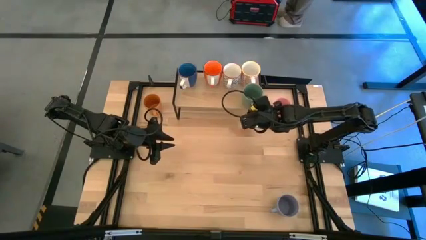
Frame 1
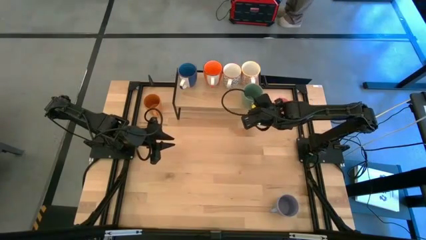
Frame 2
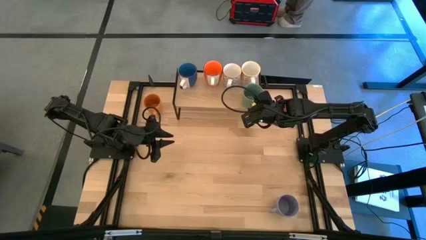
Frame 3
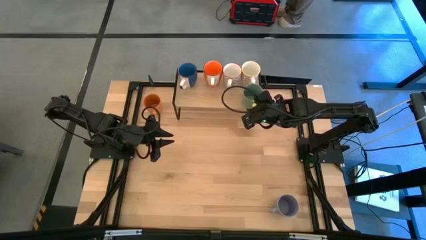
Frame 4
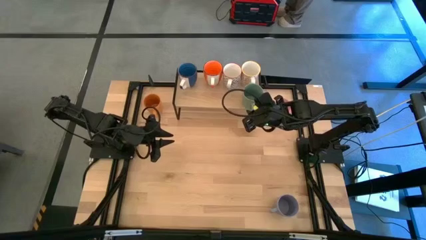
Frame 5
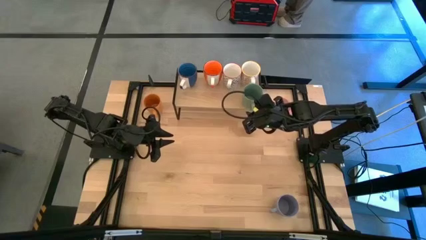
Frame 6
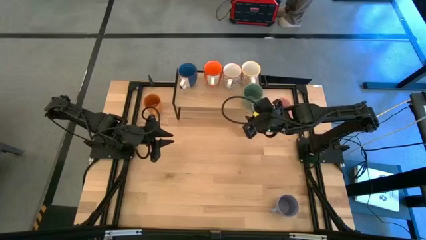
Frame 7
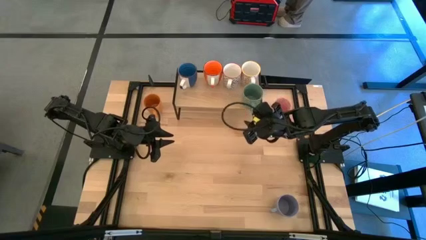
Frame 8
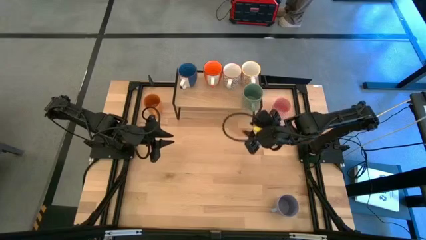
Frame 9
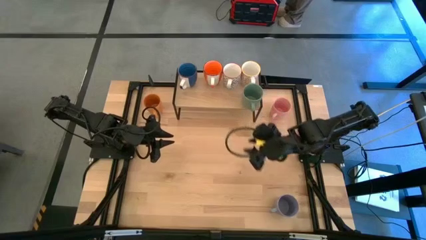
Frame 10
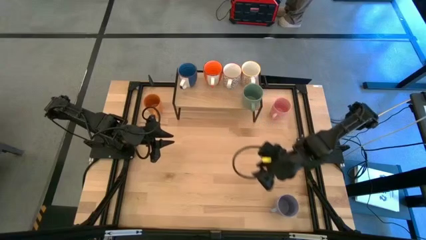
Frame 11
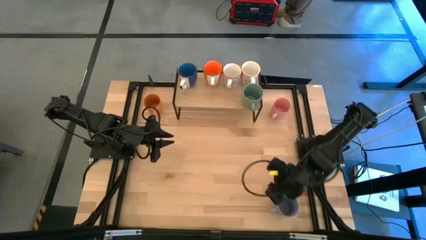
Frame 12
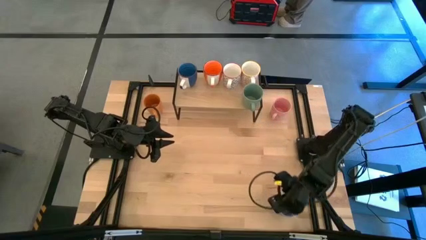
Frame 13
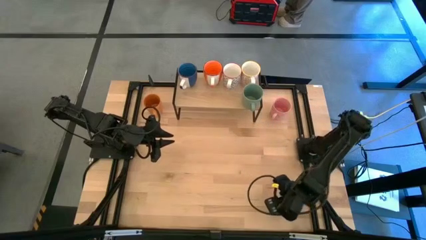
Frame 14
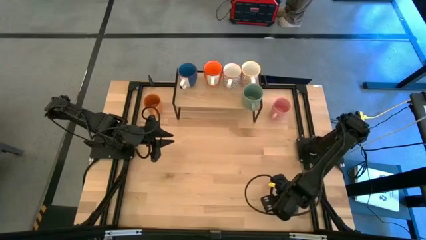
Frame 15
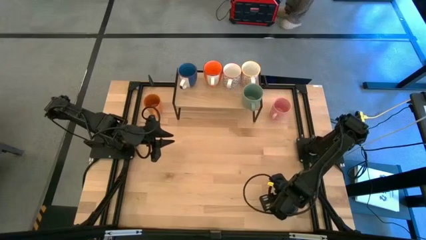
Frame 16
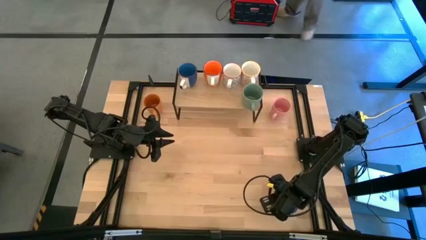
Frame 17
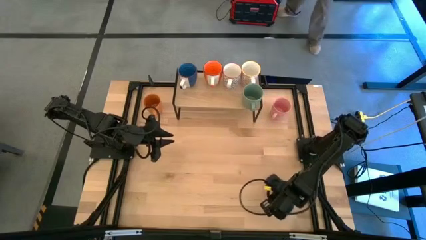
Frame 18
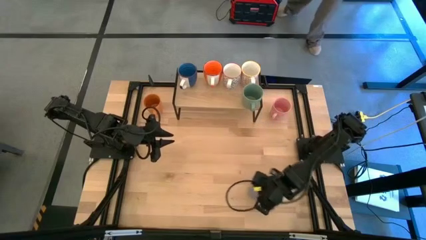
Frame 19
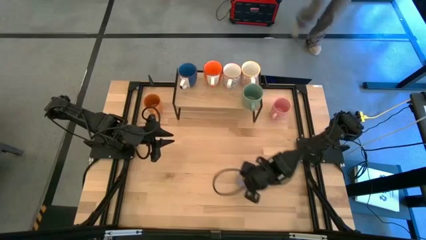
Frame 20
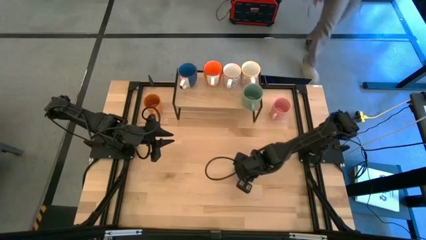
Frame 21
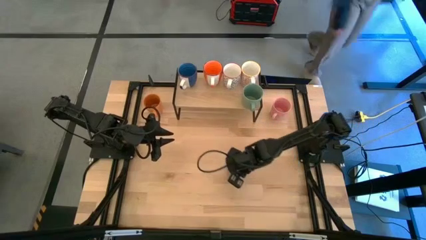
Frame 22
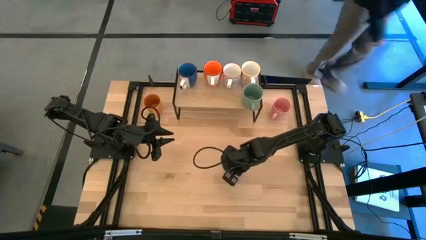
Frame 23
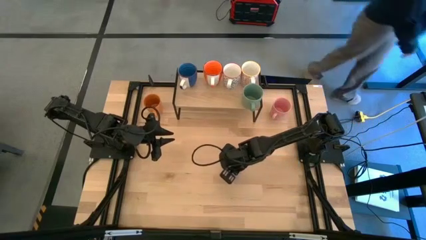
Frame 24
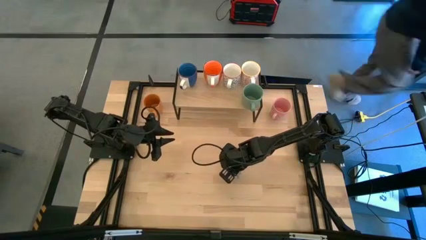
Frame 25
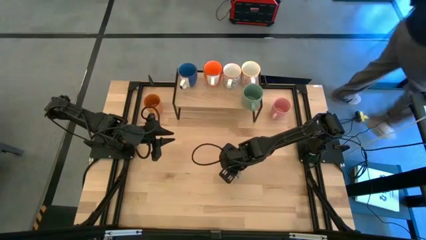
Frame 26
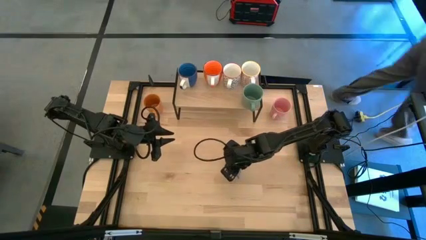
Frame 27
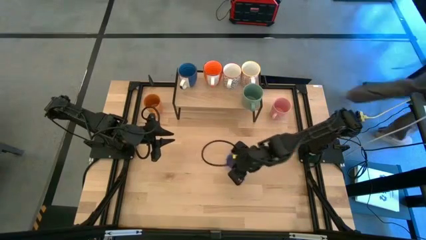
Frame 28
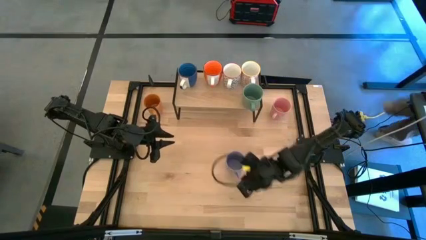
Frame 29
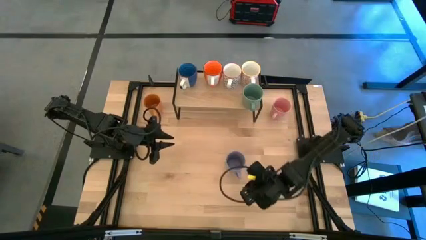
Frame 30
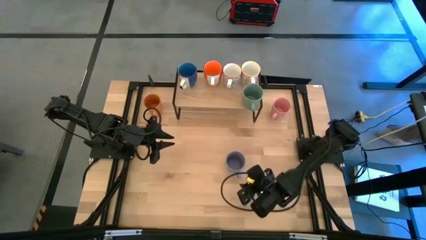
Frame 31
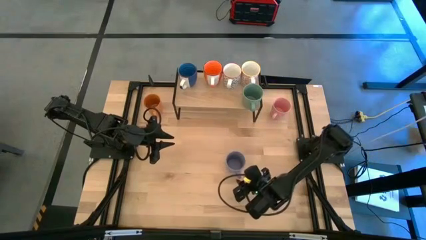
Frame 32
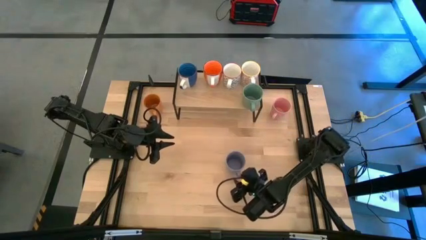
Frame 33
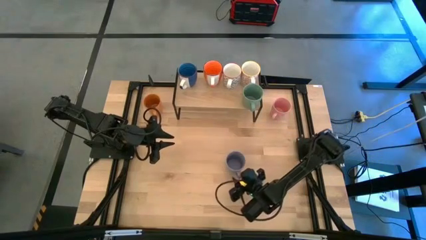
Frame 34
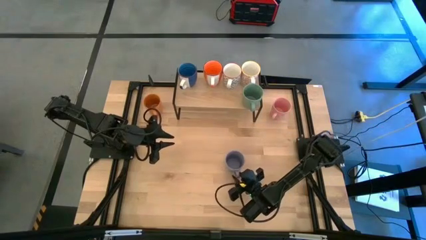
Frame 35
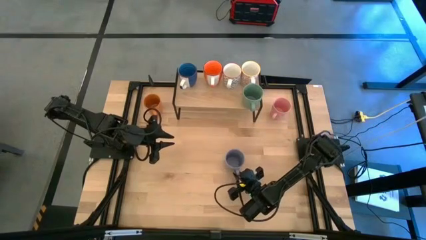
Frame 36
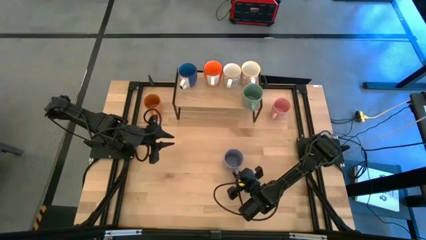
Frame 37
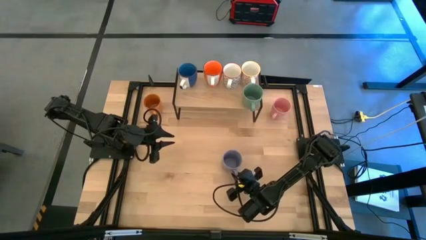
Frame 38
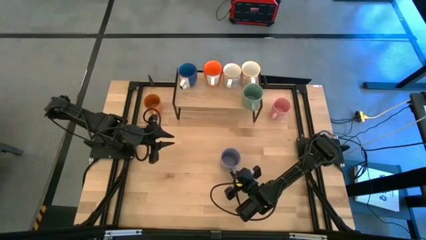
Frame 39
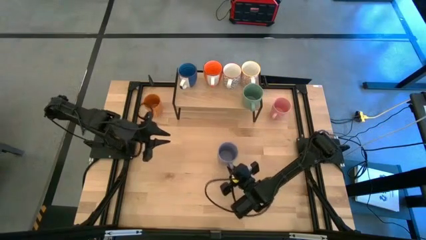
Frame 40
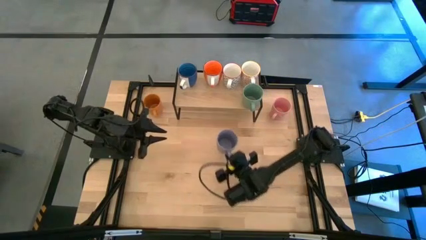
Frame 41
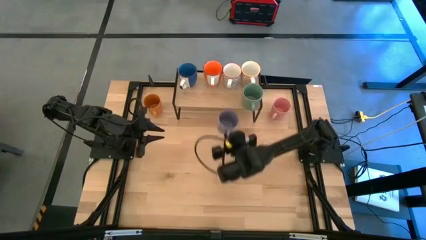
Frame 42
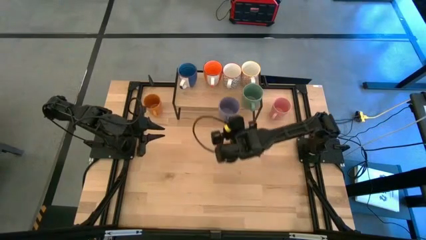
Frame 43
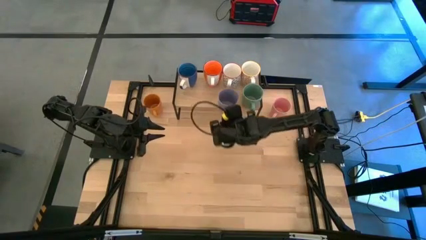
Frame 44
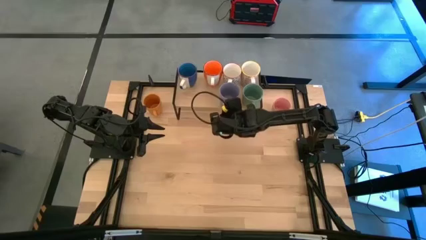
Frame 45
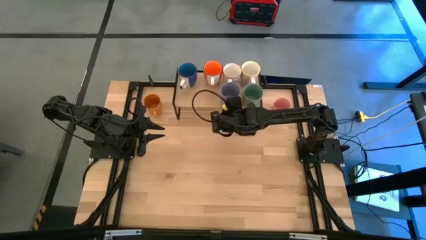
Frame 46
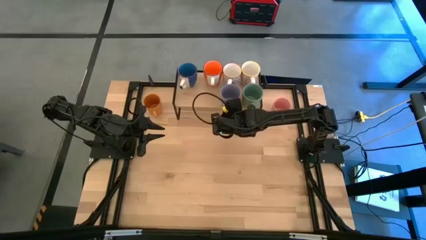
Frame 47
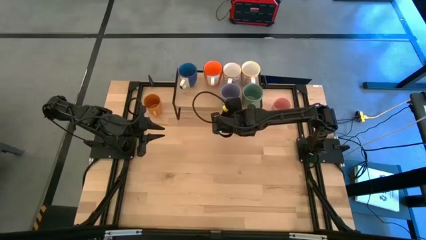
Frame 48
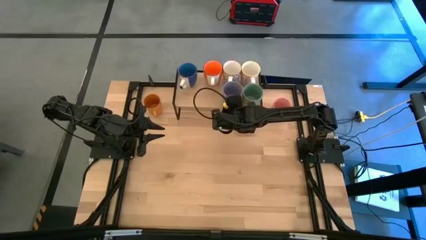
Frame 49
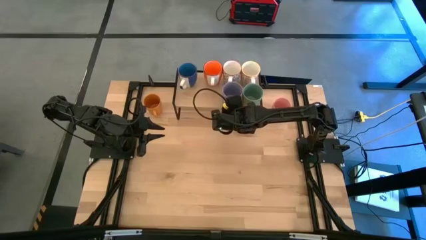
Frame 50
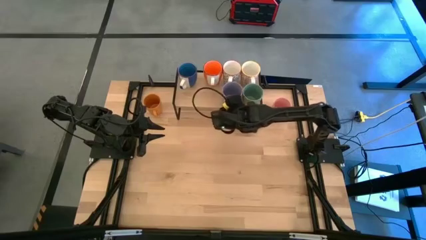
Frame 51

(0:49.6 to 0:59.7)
Task: Place coffee mugs
Put the purple mug on the shelf

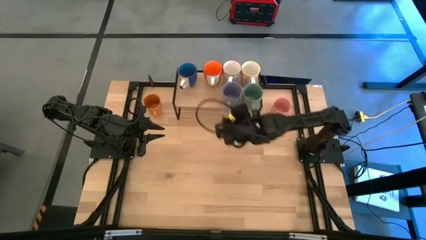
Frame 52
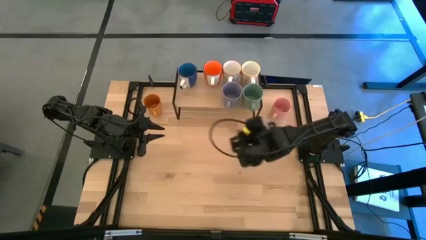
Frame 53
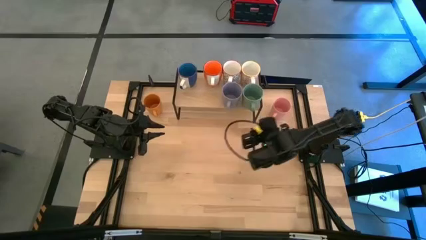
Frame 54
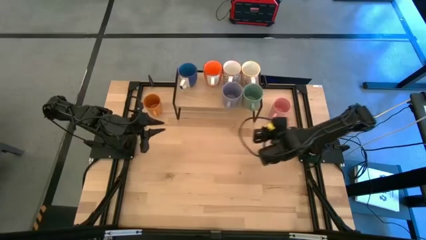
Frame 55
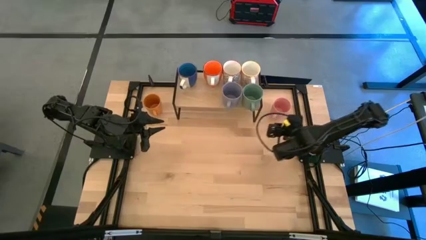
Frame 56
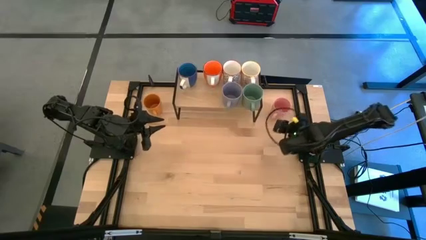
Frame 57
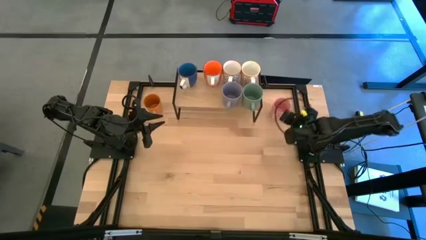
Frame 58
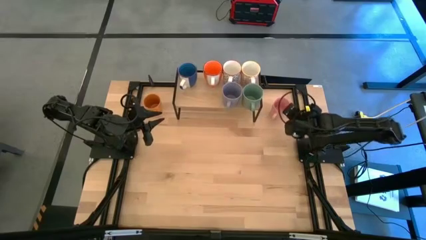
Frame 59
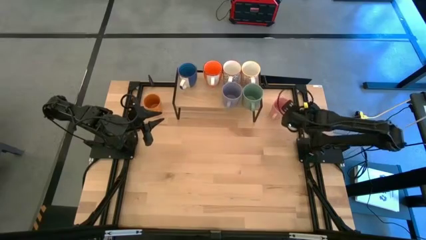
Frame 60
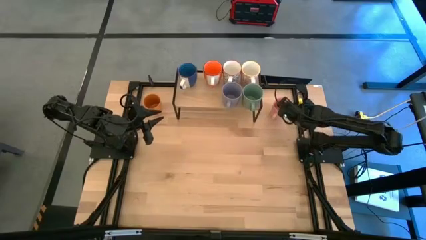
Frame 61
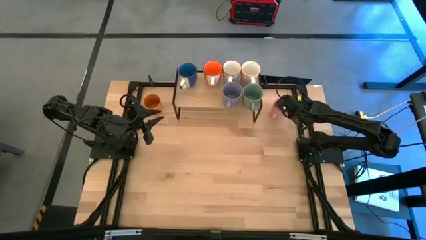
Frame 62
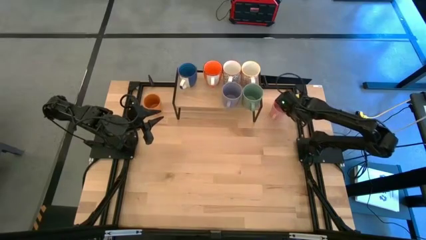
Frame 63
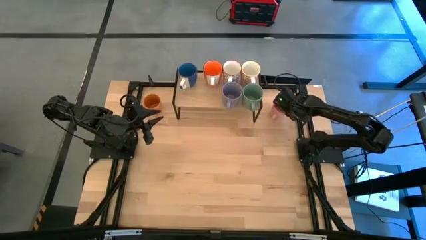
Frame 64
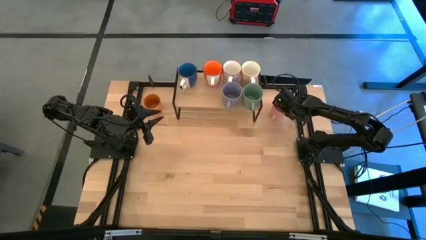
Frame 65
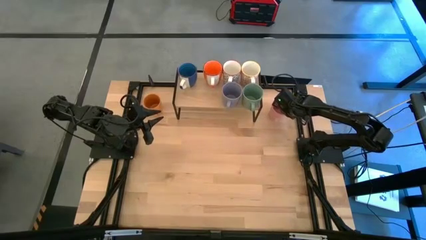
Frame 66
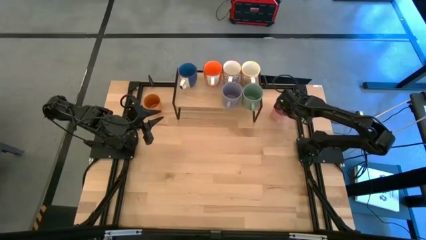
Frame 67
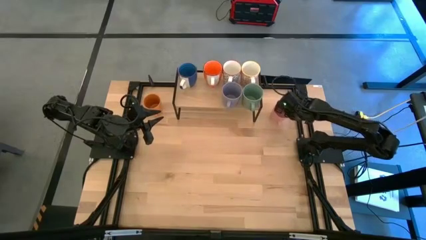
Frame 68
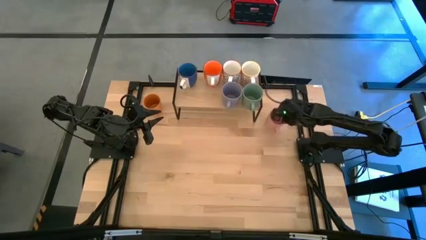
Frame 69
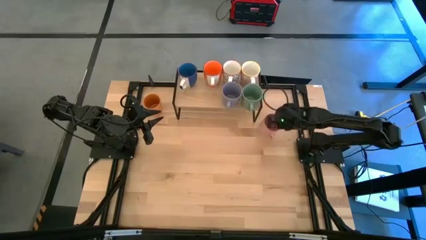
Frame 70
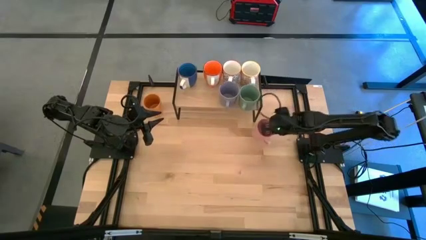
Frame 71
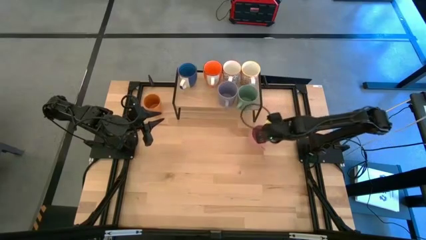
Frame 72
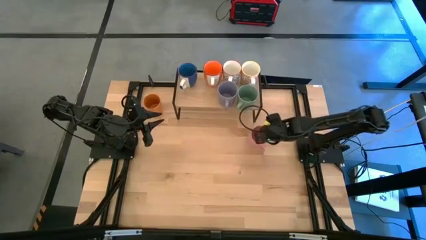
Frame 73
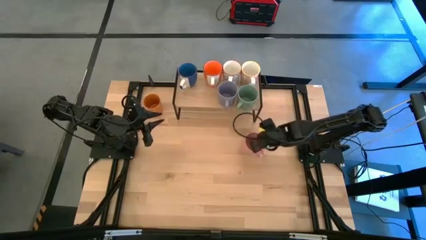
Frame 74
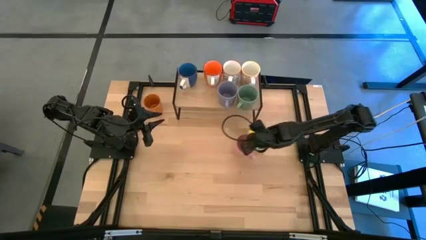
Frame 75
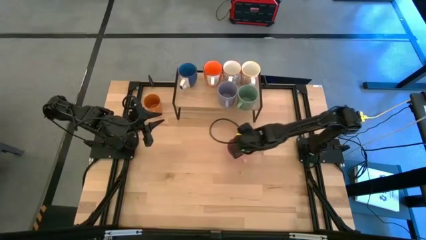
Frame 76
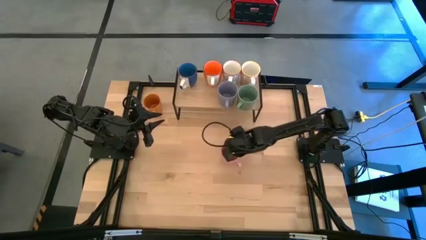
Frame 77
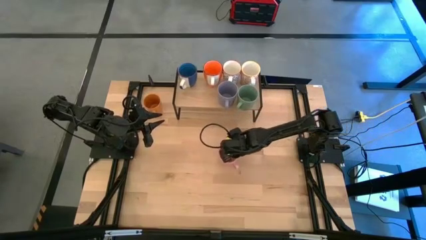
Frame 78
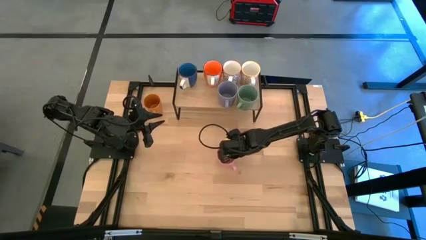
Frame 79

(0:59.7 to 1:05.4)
Move the pink mug to the center
